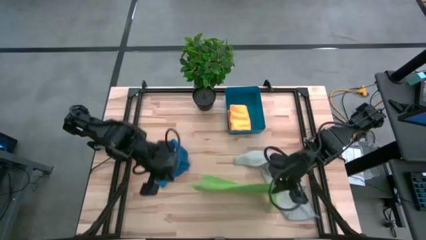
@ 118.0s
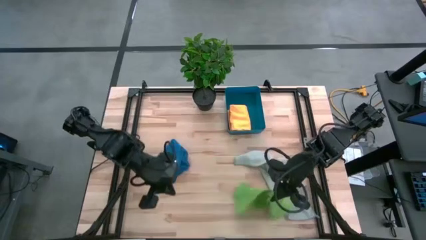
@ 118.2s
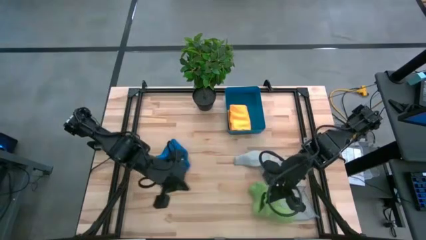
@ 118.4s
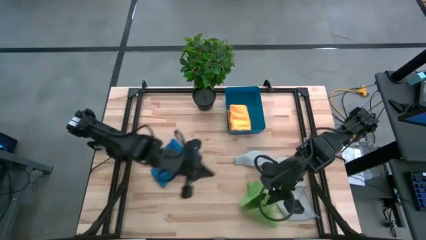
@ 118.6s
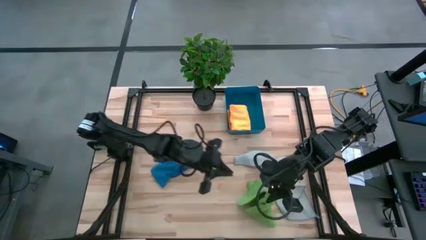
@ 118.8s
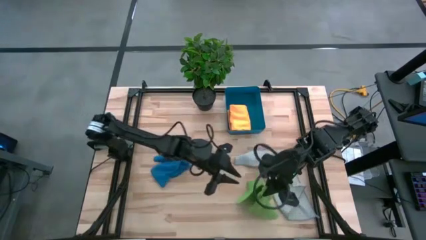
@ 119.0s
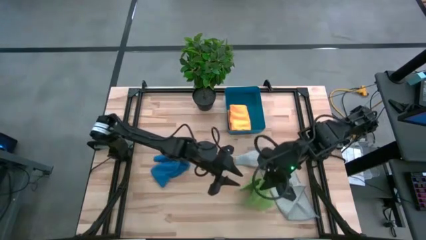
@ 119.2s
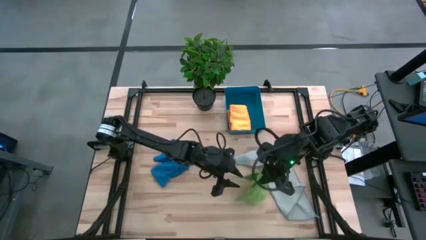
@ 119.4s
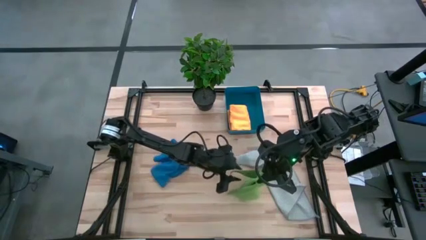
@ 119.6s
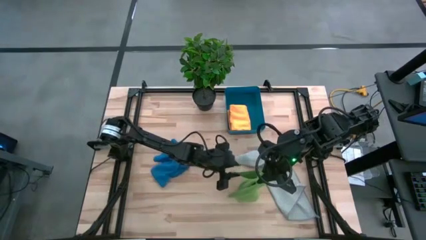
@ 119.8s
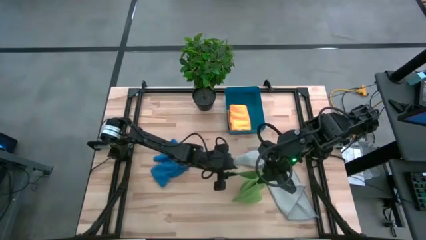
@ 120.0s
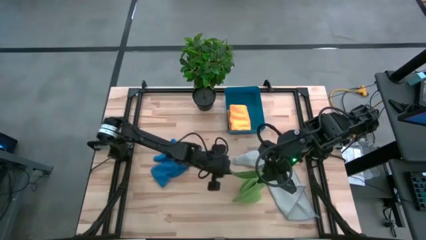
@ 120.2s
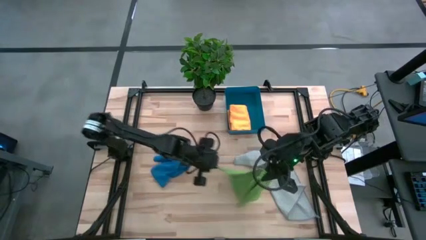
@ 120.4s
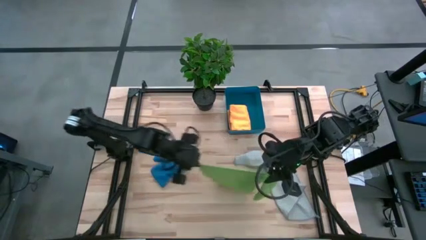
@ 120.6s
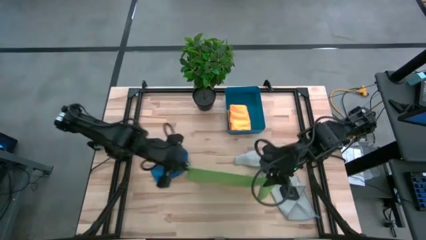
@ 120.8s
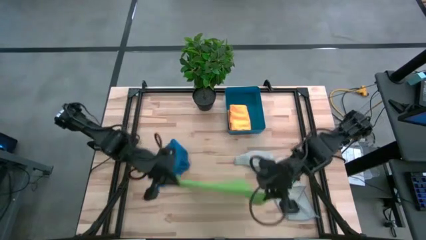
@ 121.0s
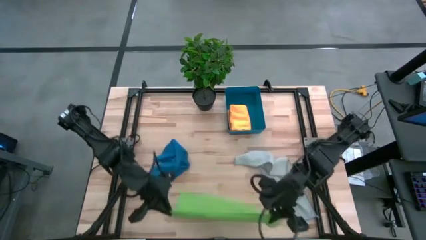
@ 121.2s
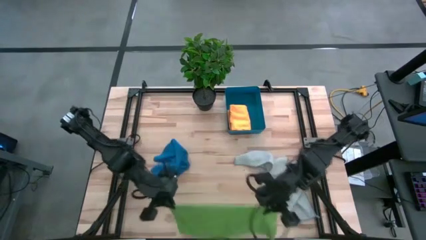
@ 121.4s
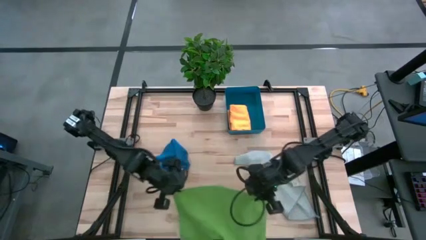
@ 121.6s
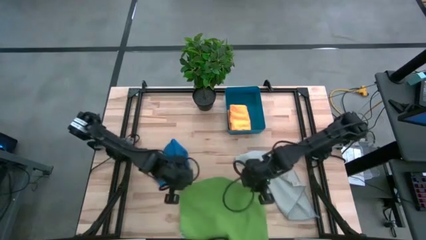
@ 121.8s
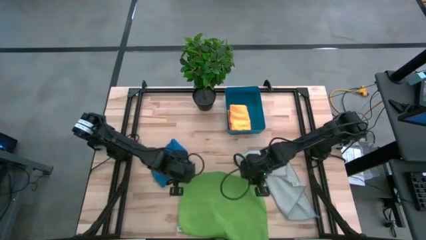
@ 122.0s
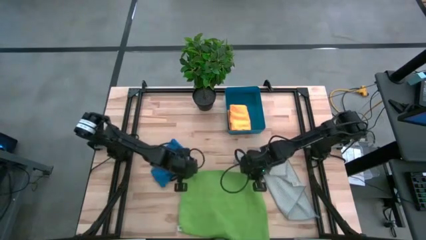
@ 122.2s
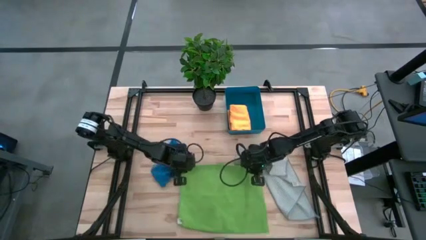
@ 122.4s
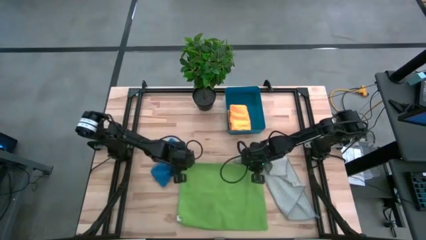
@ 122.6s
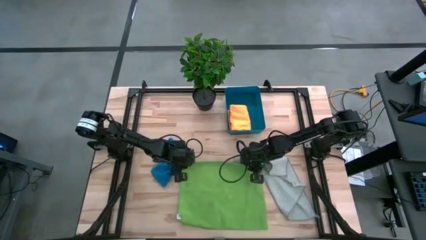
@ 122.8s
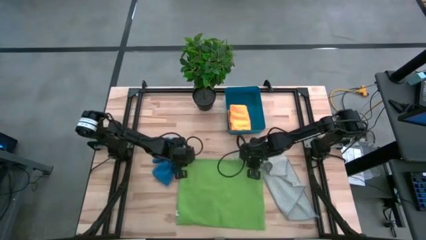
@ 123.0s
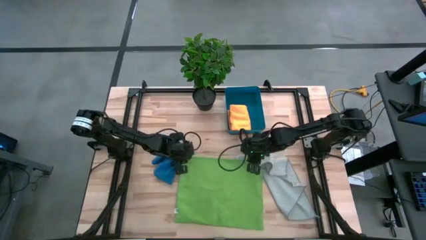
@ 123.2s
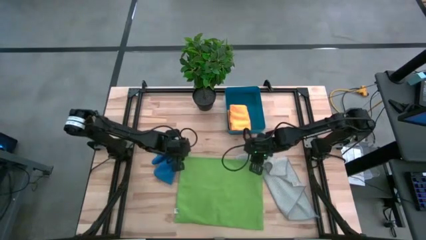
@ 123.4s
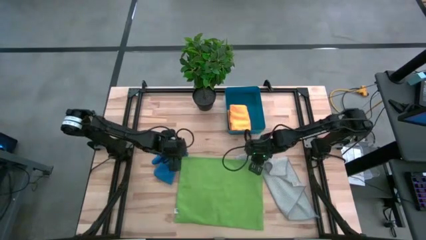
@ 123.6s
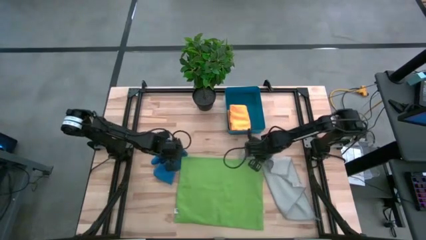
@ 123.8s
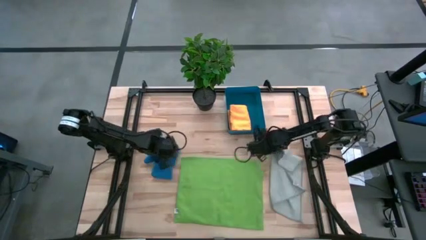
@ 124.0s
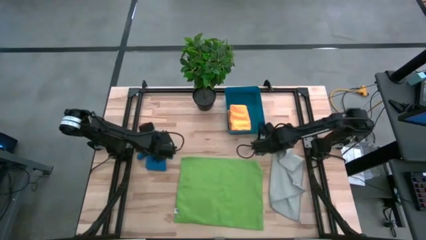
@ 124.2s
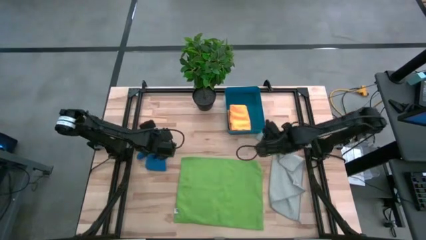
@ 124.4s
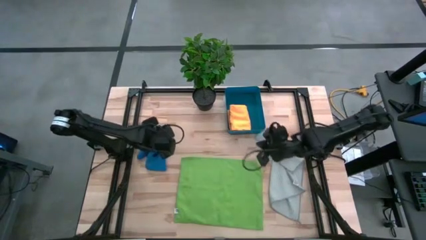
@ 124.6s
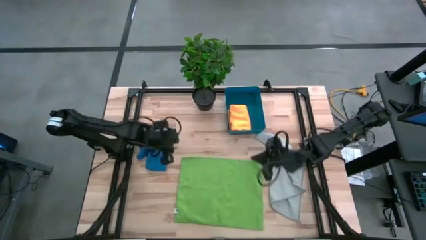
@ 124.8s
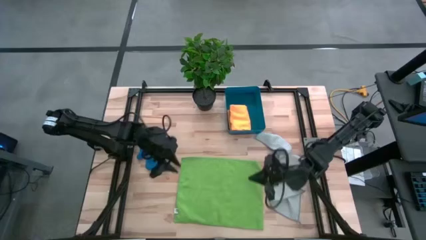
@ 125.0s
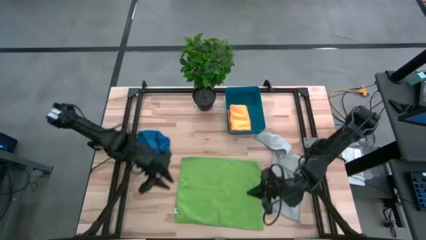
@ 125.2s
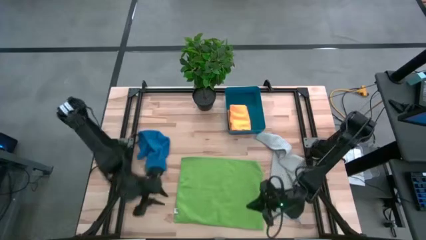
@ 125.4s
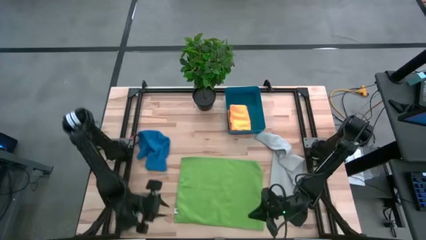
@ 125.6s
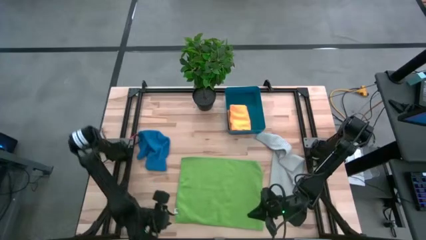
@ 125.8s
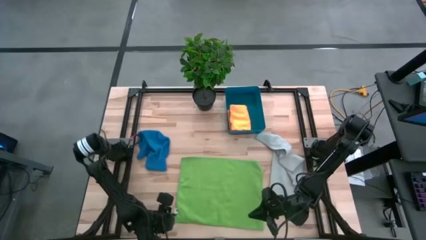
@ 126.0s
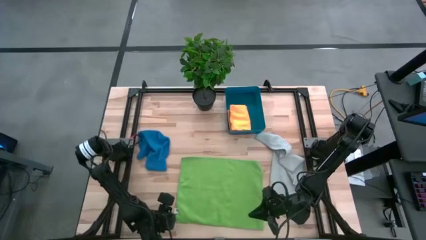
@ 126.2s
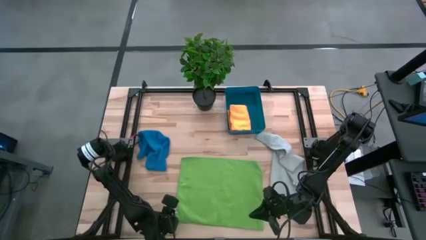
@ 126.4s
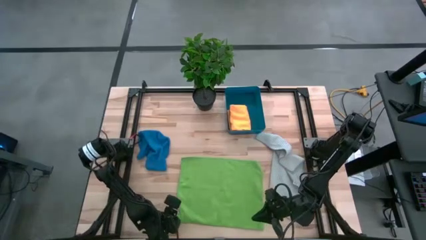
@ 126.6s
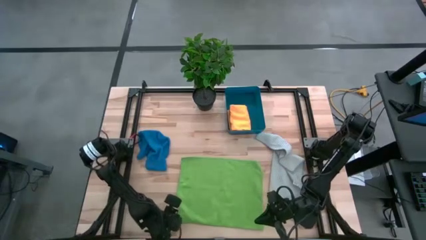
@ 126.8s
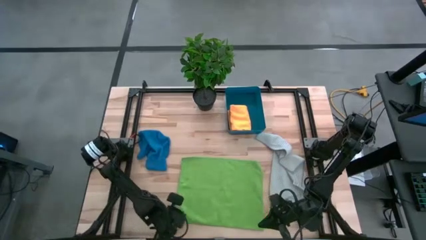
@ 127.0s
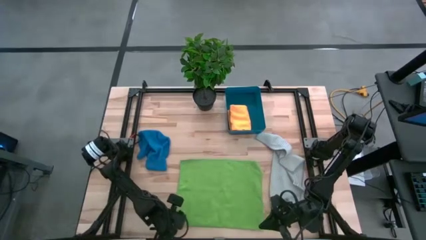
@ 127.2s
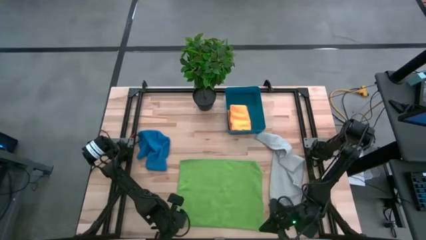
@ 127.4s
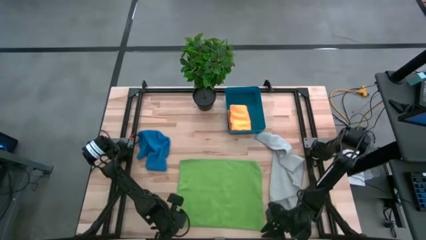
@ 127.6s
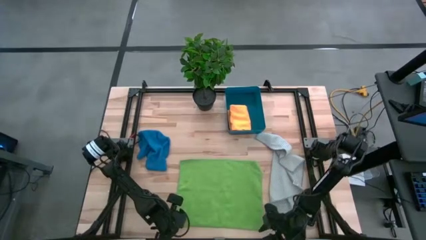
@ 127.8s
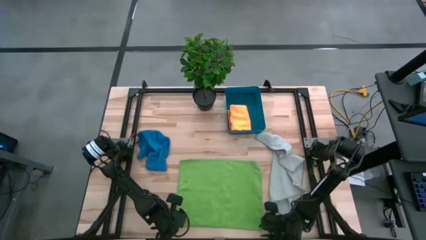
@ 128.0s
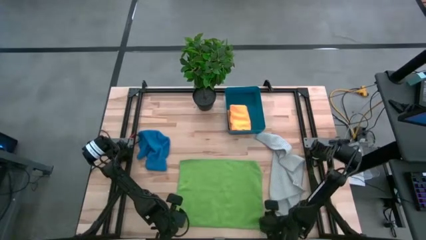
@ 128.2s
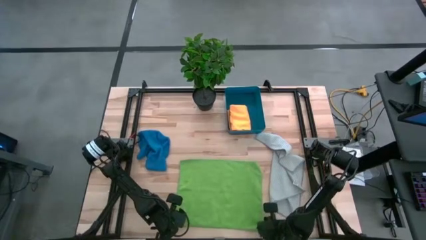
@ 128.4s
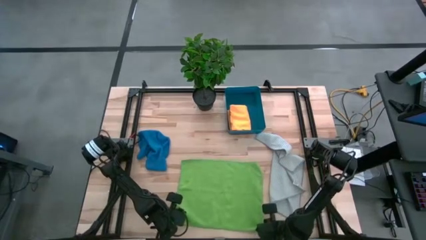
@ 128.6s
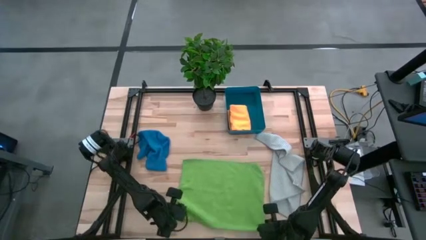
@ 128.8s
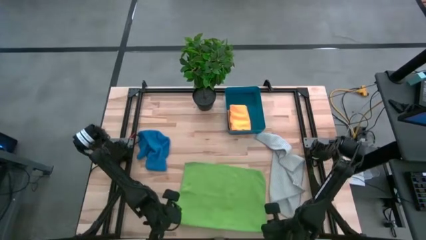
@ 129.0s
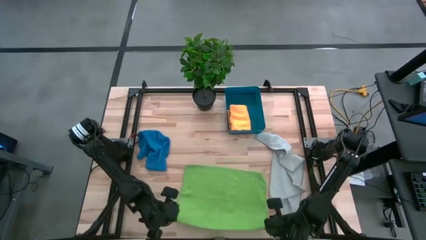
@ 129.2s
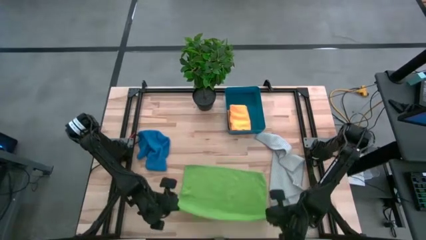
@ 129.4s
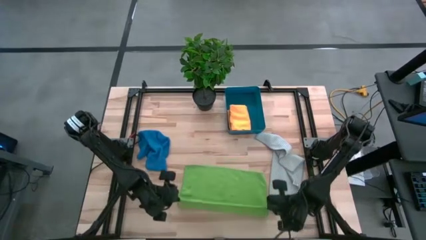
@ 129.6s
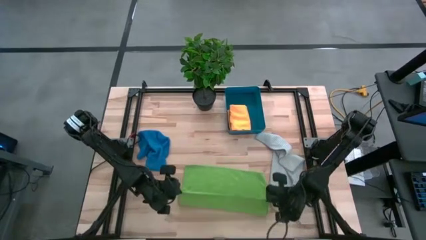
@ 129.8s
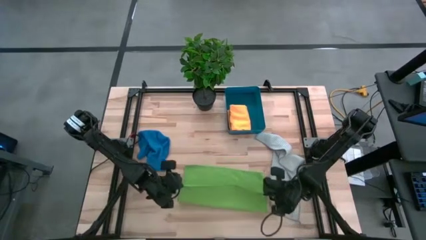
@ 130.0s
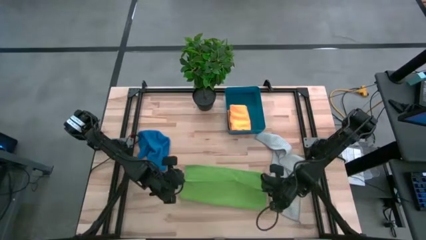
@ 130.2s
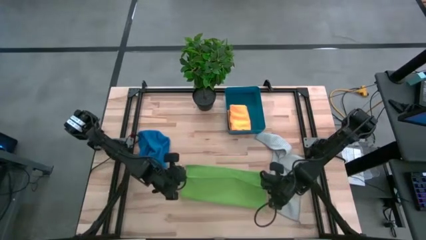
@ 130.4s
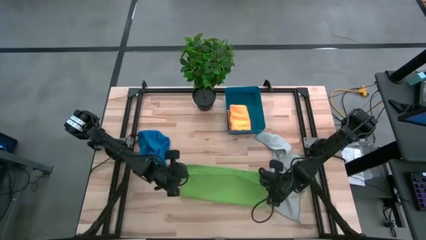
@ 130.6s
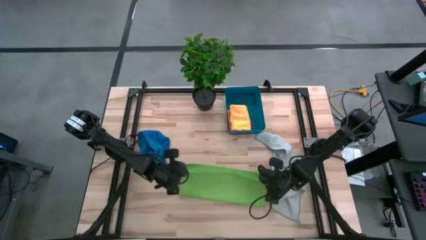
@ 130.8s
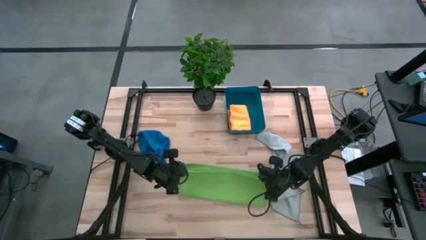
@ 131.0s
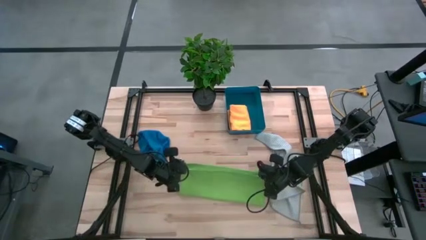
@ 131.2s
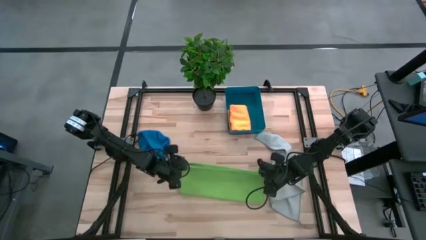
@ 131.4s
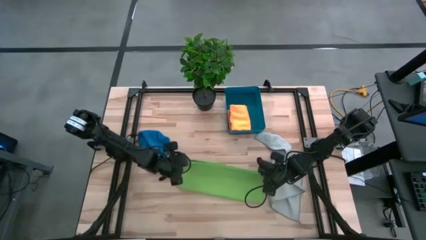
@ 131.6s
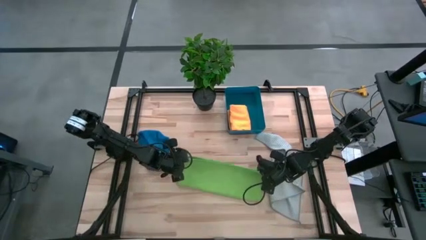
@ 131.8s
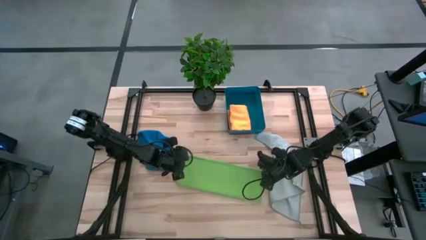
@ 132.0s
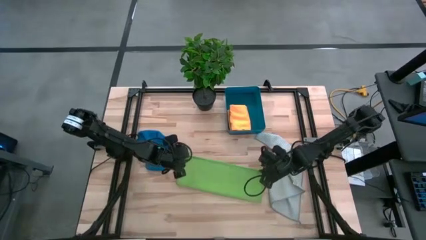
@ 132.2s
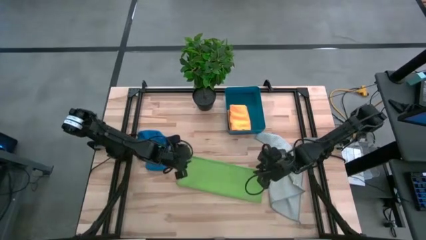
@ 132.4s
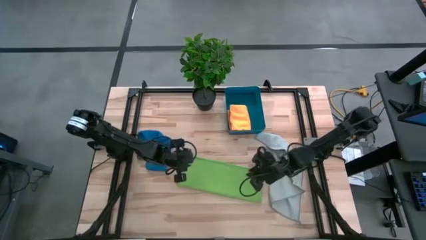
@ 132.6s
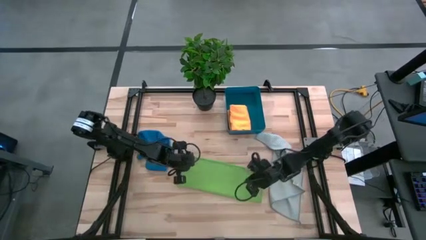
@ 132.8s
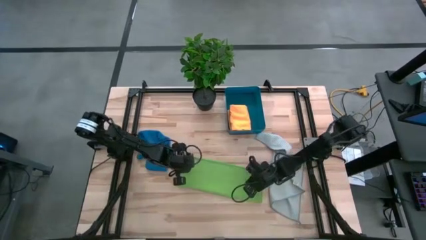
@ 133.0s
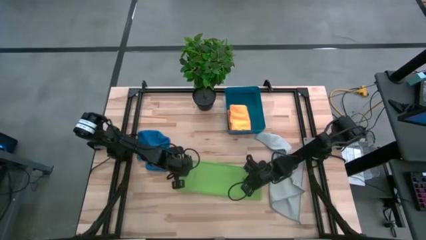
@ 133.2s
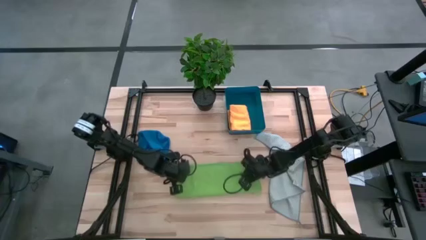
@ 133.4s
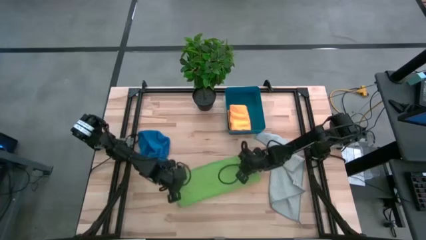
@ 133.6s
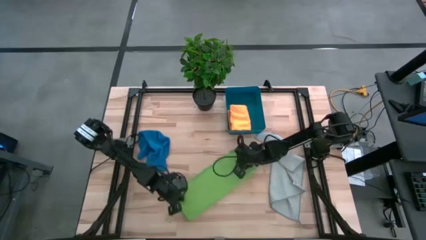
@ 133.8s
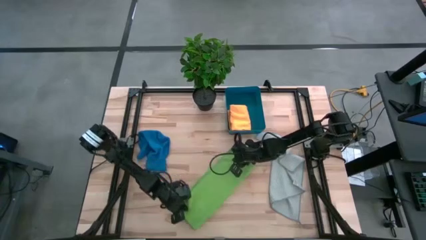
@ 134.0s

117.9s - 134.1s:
Task: Fold microfiber towels
Fold the green microfiber towel
